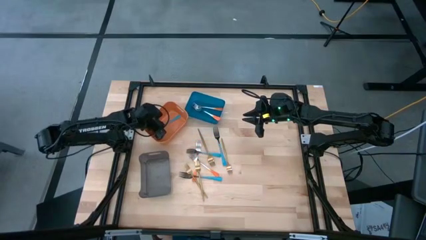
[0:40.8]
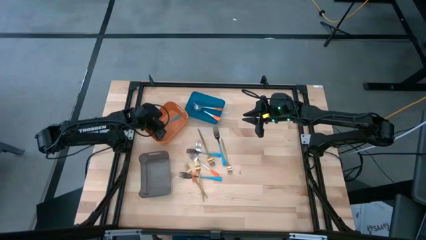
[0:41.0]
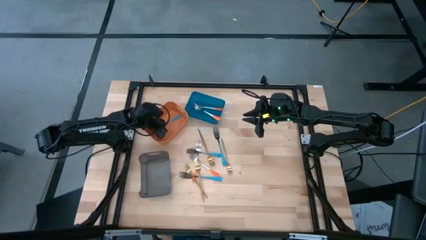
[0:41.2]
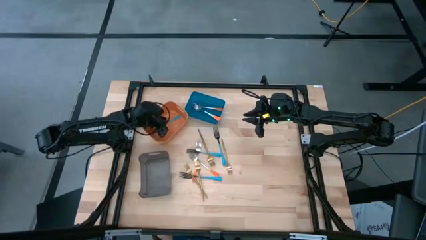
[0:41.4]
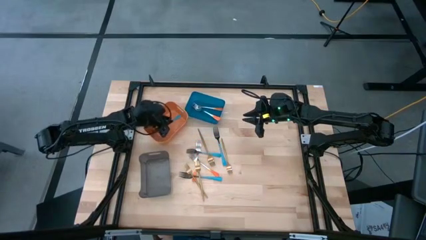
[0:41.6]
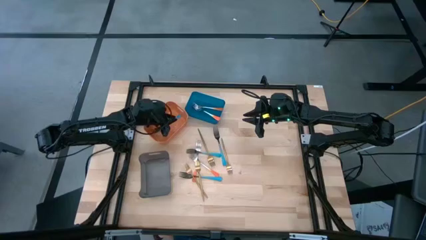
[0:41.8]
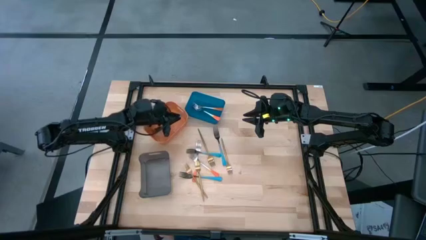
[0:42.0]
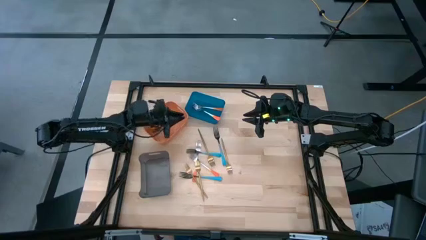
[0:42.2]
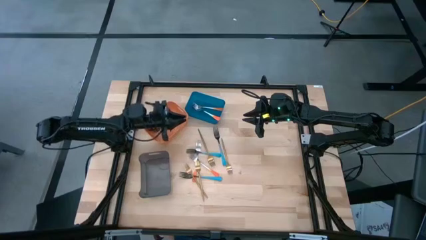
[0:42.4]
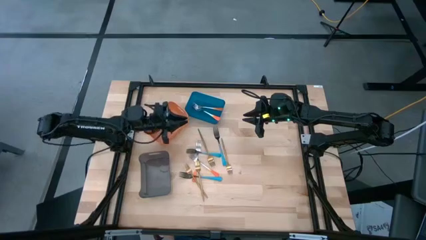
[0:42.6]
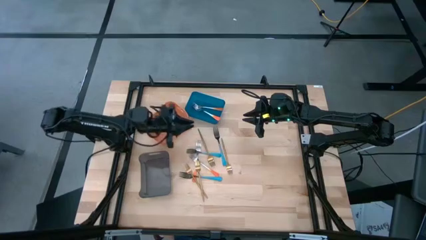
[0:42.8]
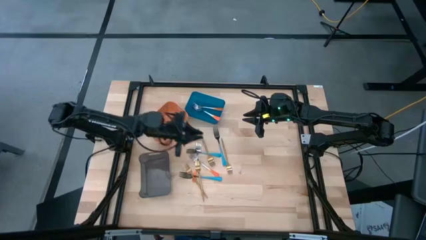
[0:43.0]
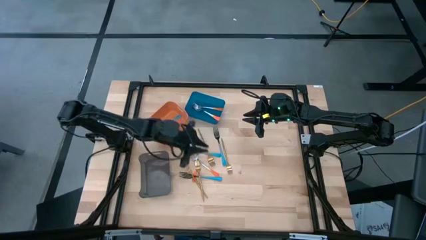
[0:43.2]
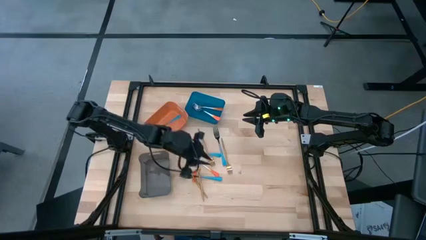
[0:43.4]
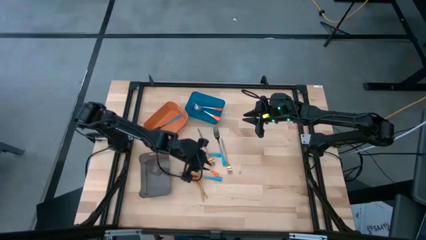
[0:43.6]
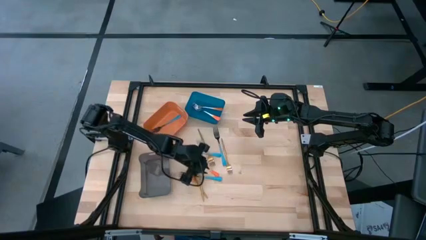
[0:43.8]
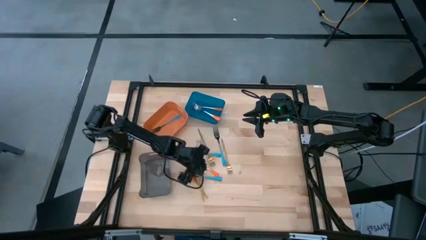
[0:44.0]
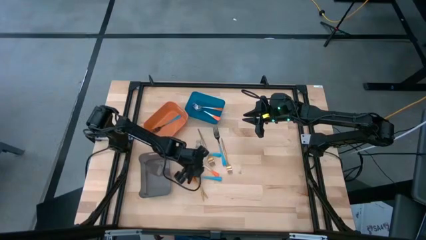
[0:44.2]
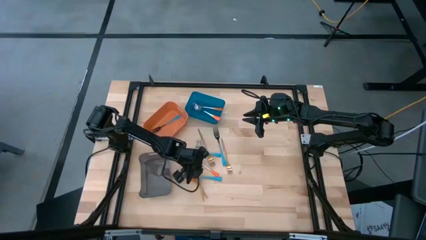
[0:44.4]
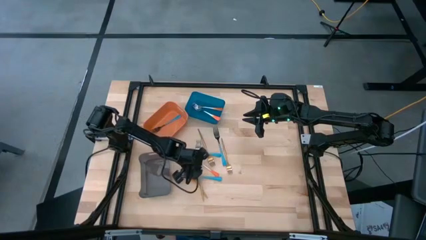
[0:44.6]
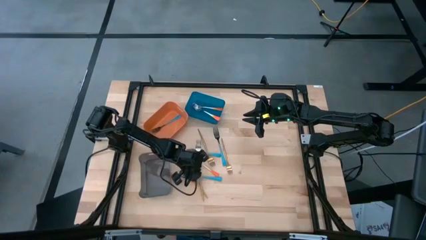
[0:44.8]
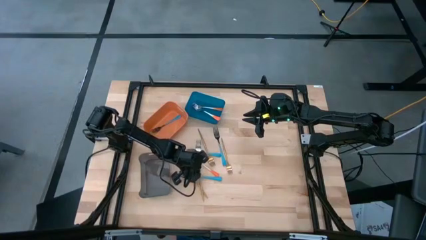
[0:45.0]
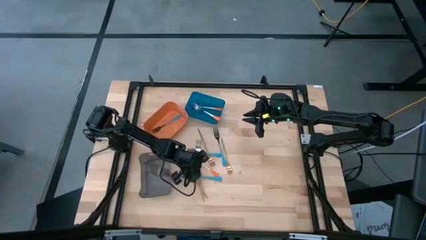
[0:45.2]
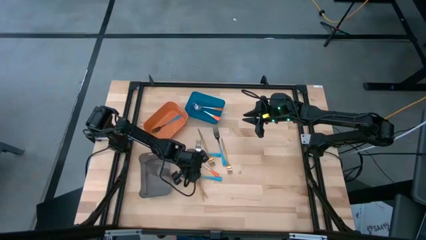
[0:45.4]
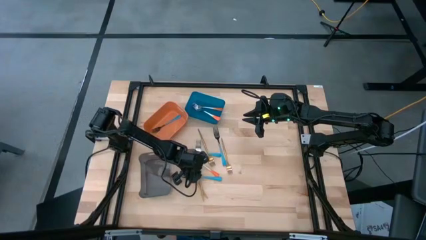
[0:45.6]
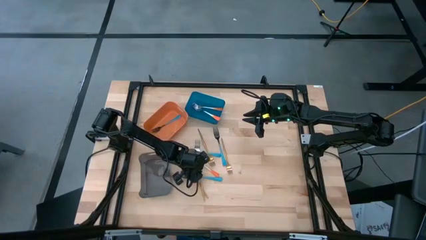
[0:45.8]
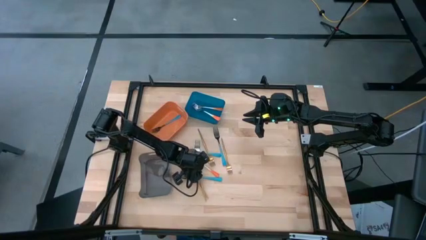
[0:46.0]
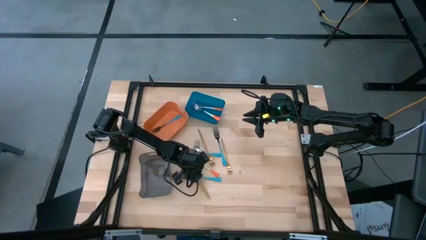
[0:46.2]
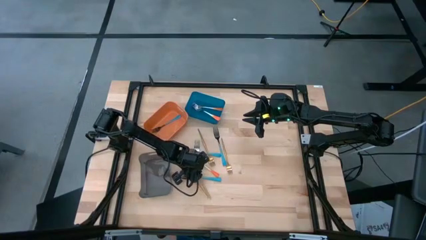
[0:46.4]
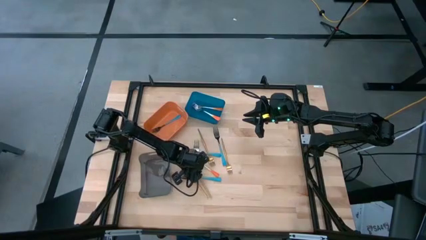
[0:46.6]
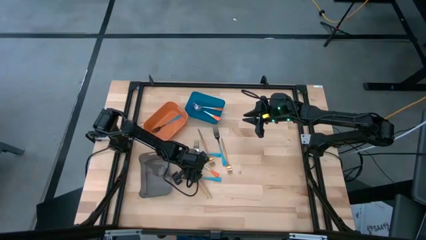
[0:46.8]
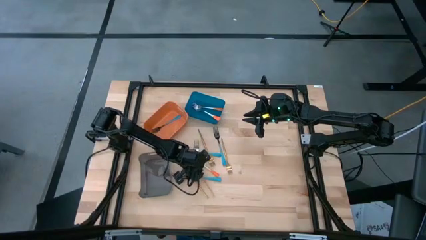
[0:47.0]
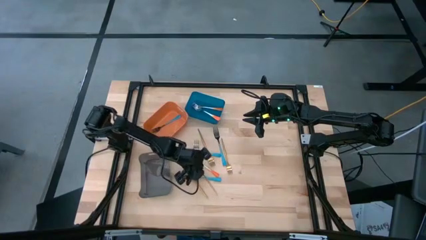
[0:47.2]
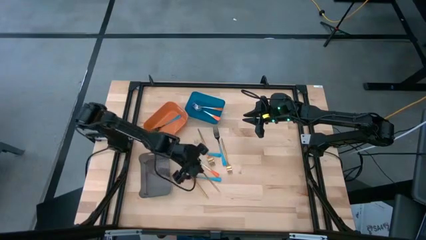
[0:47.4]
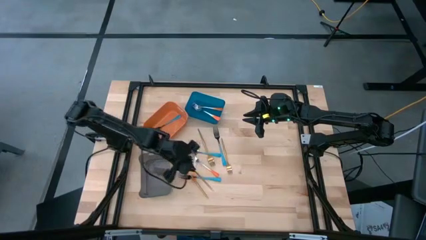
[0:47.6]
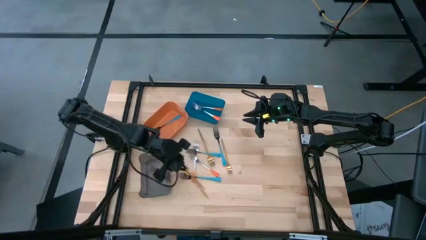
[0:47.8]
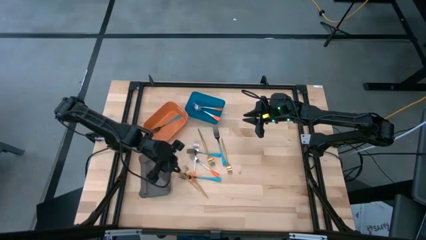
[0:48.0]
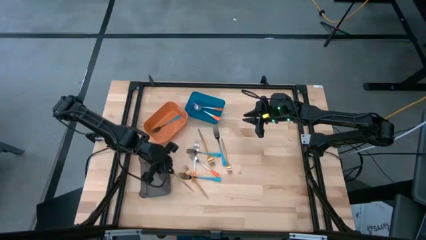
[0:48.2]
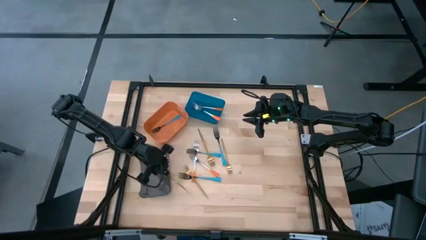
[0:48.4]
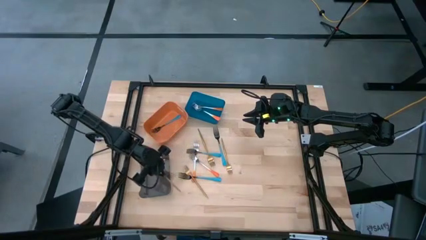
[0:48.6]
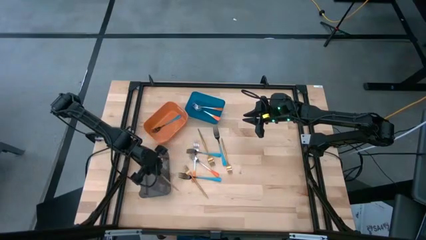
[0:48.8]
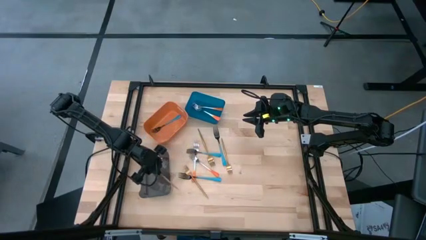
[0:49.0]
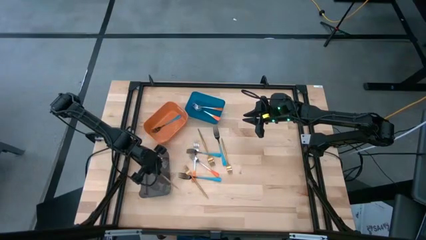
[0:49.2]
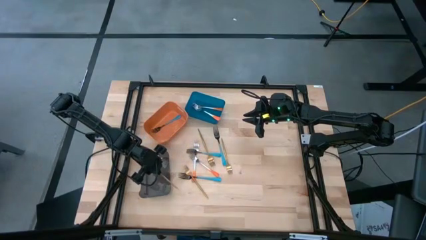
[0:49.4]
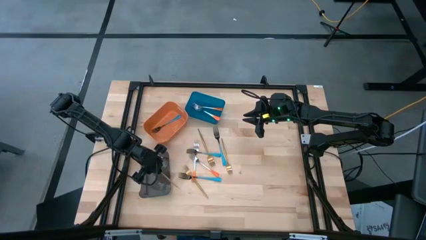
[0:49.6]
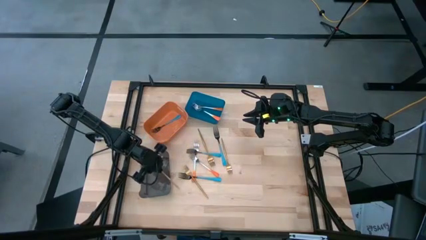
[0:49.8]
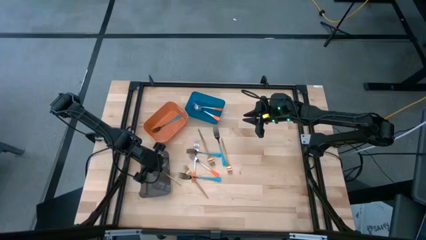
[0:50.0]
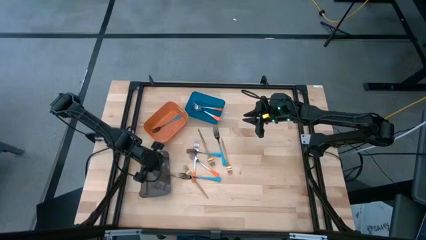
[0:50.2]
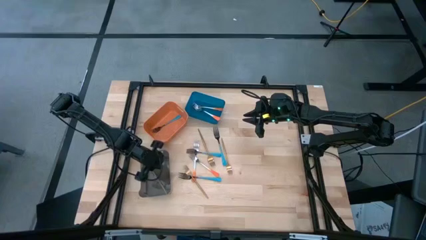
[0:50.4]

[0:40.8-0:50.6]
Task: Sort silverware by color (type)
Put the gold fork into the black bin
